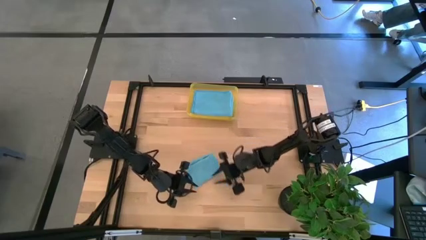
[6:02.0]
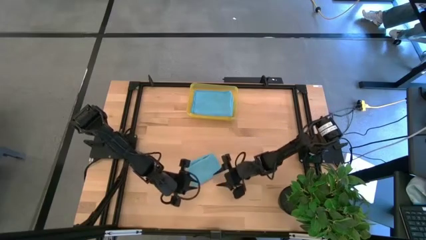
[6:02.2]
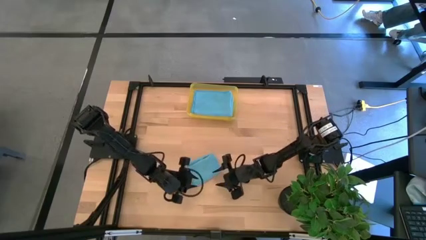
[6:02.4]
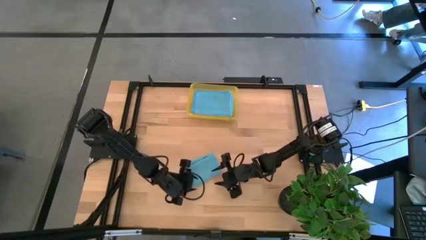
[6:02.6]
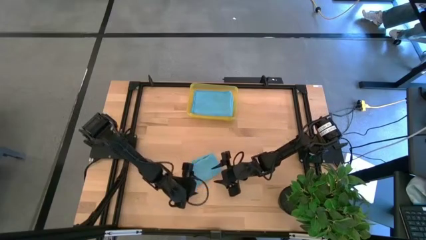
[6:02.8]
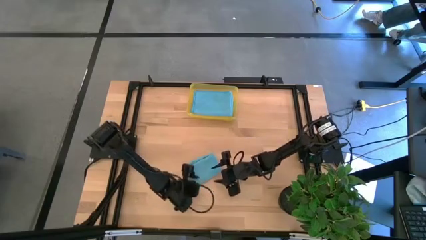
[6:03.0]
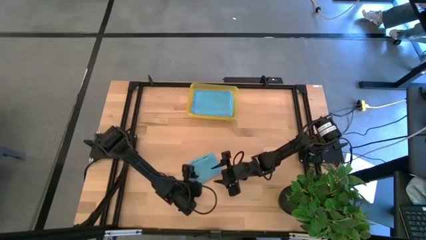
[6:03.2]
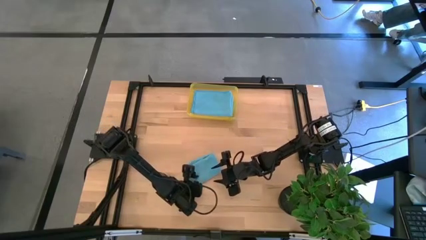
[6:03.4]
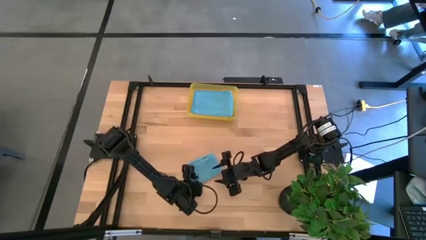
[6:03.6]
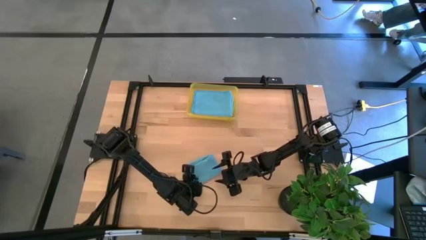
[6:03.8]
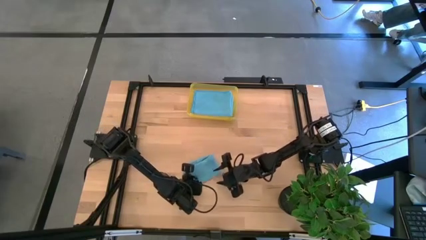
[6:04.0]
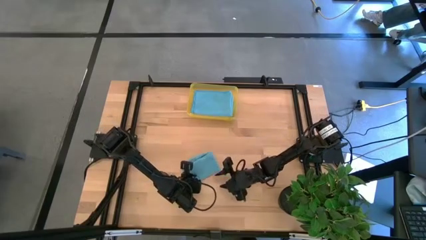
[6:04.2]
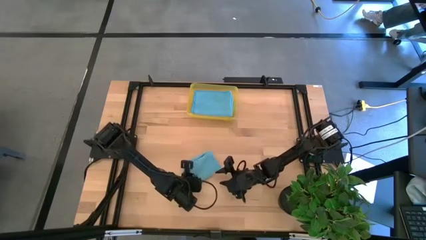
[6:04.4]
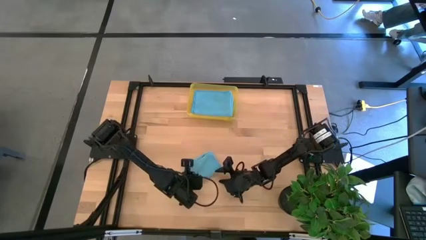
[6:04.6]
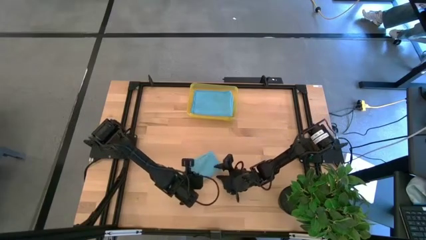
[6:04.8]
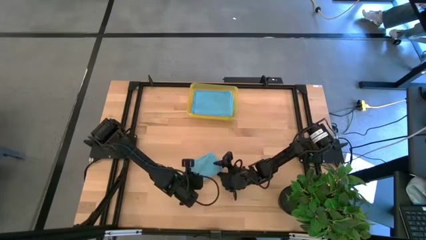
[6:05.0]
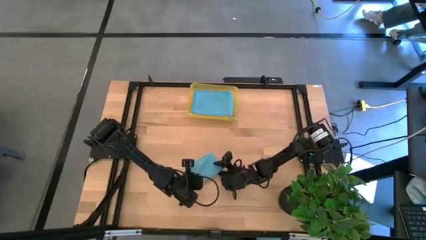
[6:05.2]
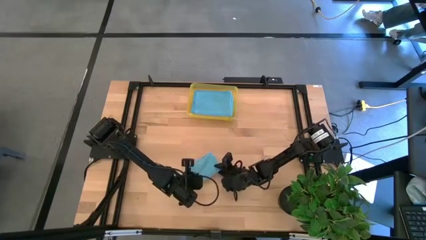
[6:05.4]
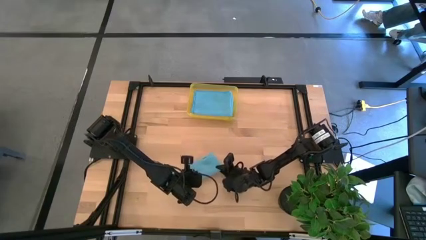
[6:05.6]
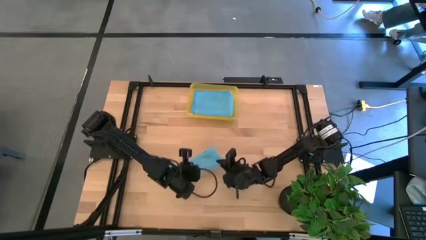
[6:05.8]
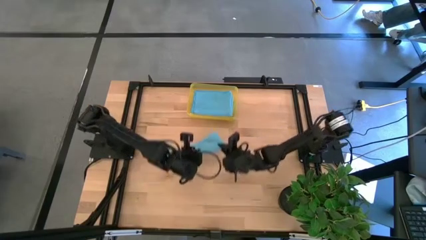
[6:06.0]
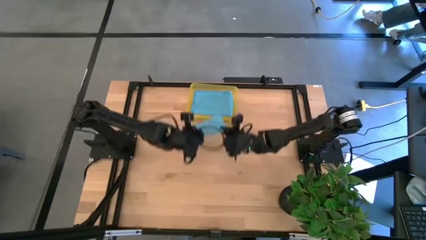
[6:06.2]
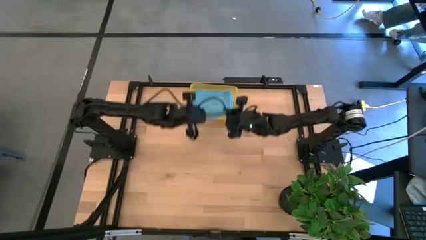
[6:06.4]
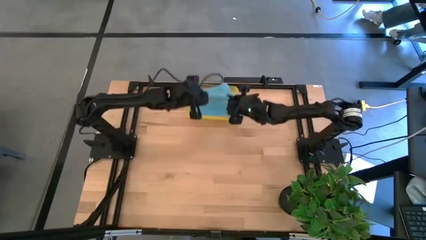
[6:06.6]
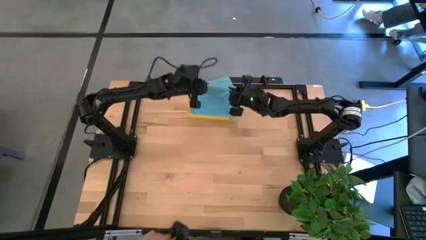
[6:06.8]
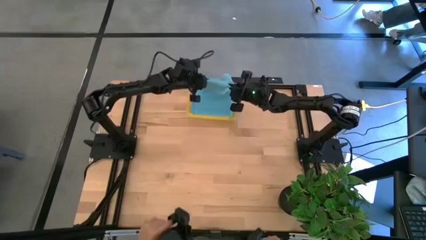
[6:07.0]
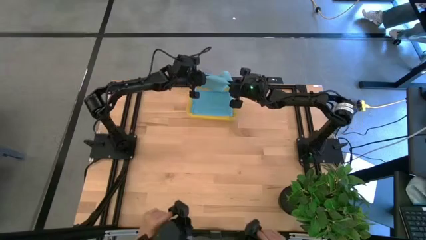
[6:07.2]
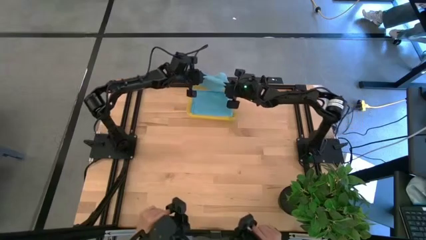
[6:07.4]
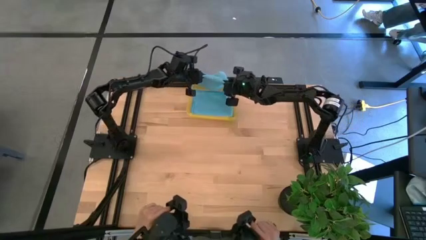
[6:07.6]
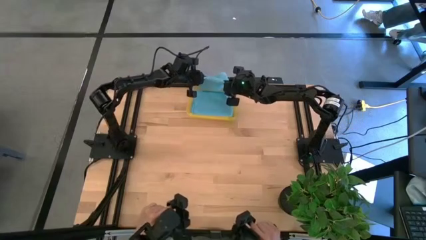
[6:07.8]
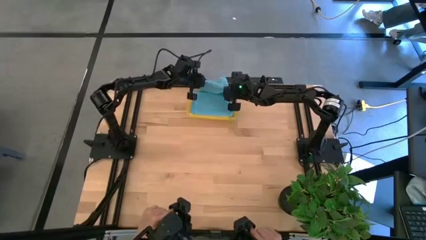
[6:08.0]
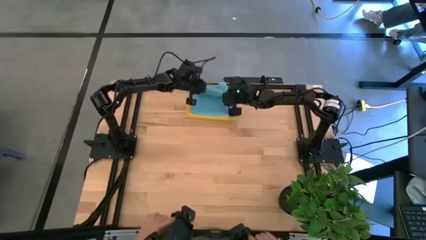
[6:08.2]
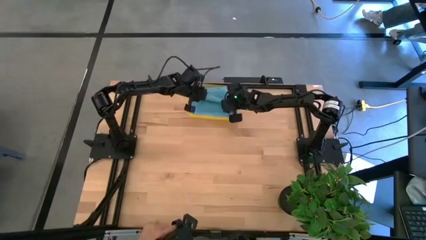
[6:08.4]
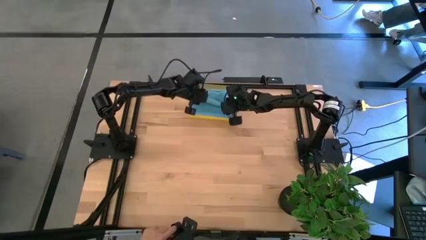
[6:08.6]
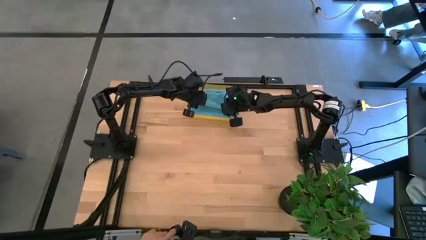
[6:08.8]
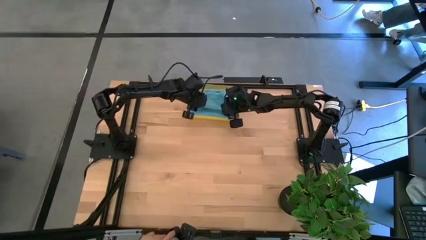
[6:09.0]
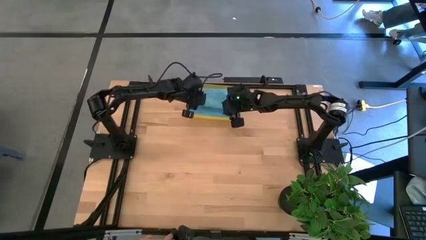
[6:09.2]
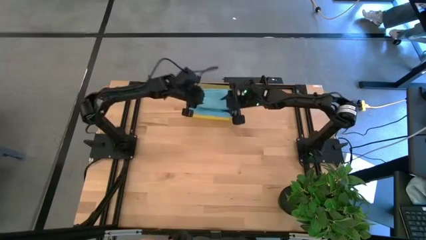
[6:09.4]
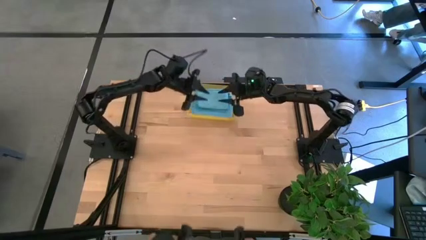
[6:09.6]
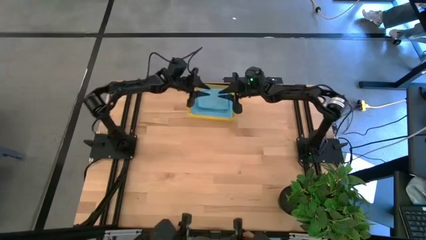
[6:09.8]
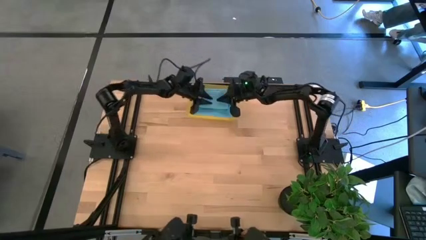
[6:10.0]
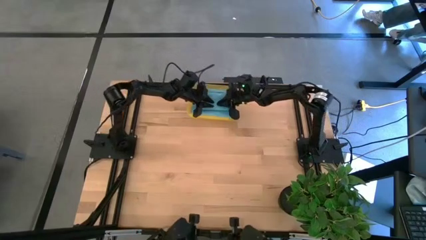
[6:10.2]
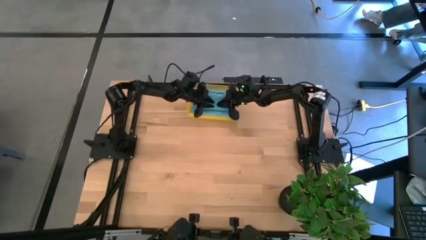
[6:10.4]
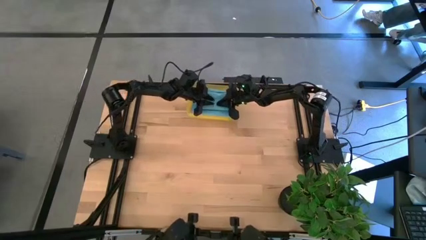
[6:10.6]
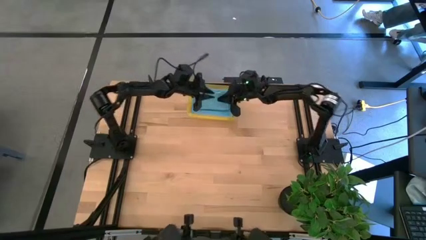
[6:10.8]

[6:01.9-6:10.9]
Task: Fold microfiber towels
Put the blue towel into the yellow bin

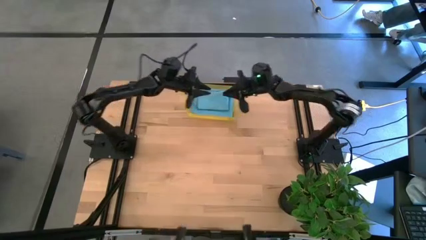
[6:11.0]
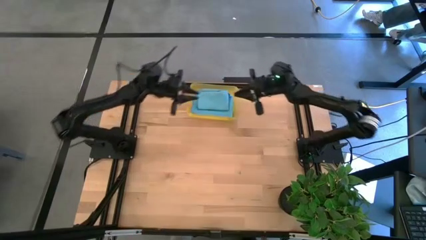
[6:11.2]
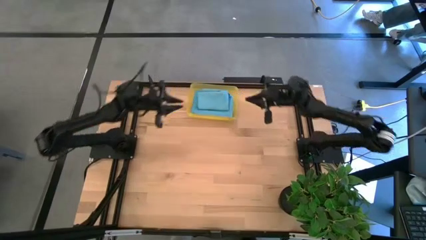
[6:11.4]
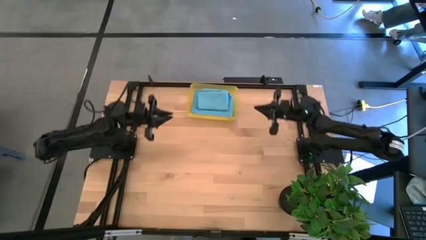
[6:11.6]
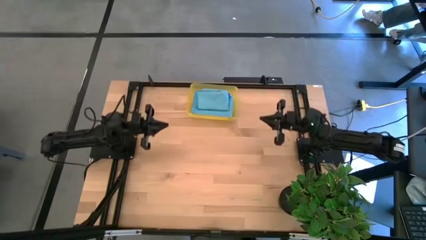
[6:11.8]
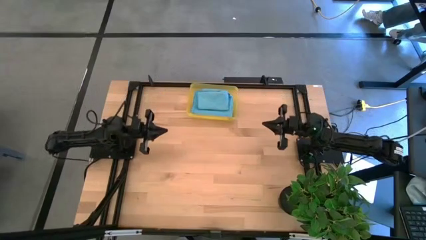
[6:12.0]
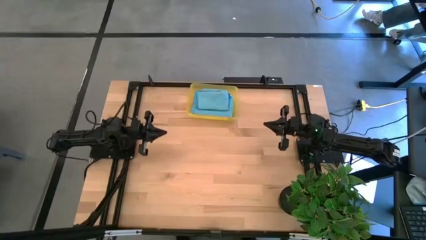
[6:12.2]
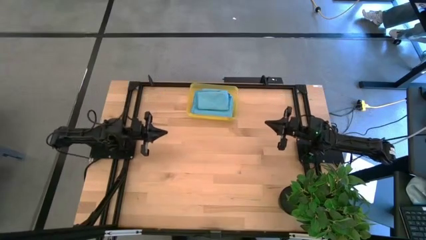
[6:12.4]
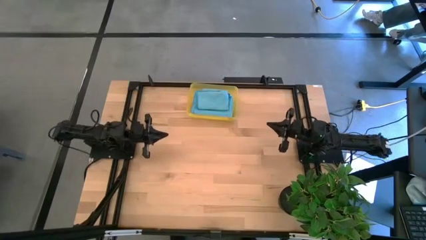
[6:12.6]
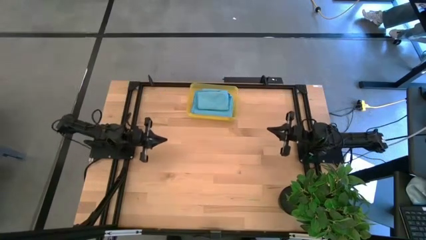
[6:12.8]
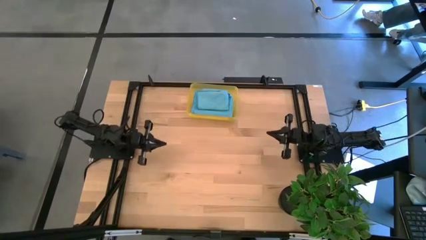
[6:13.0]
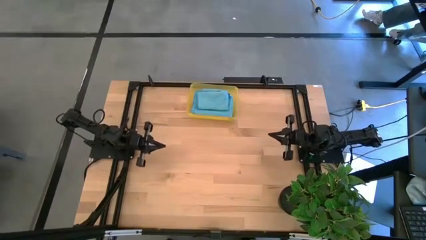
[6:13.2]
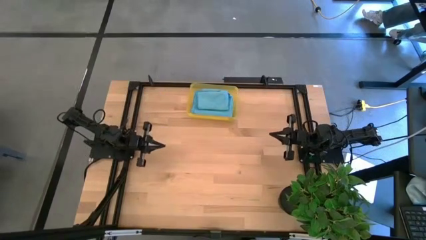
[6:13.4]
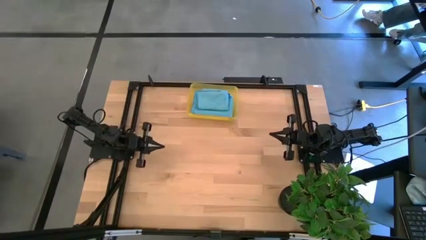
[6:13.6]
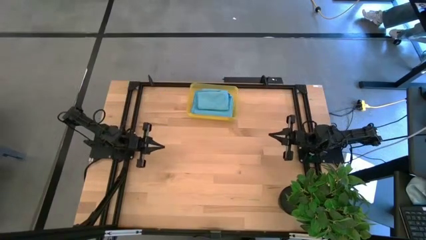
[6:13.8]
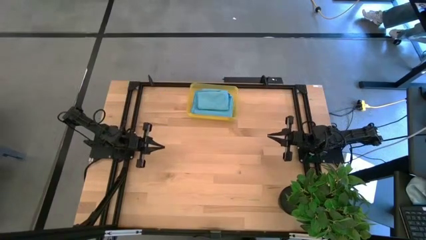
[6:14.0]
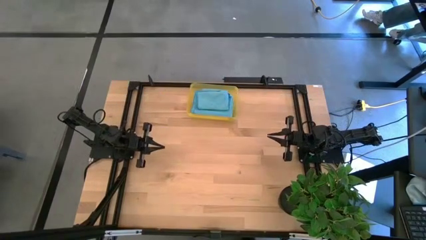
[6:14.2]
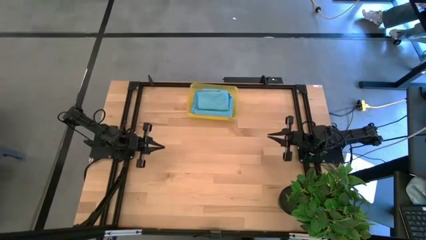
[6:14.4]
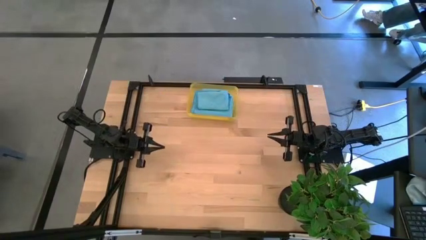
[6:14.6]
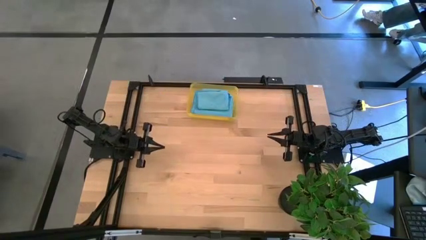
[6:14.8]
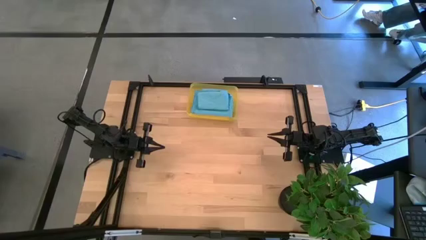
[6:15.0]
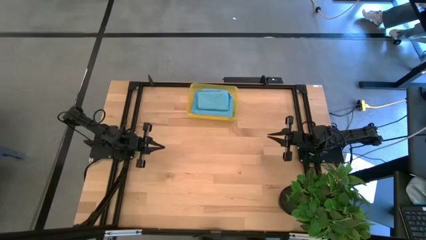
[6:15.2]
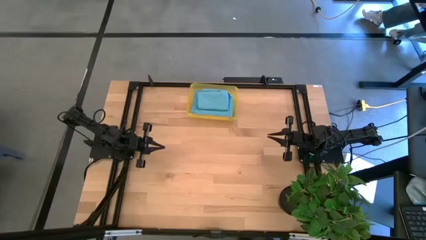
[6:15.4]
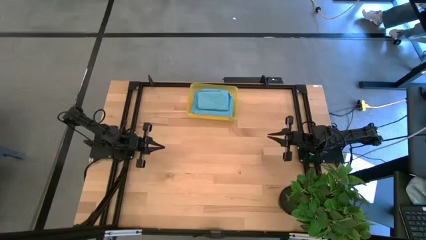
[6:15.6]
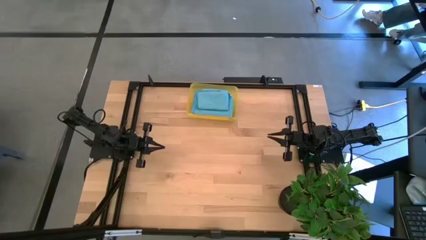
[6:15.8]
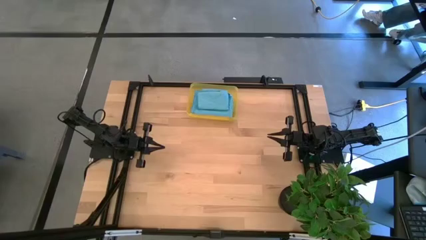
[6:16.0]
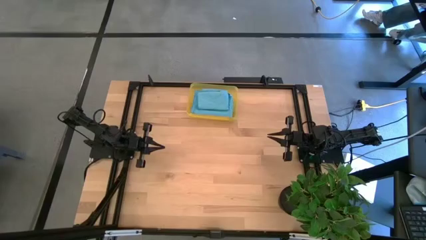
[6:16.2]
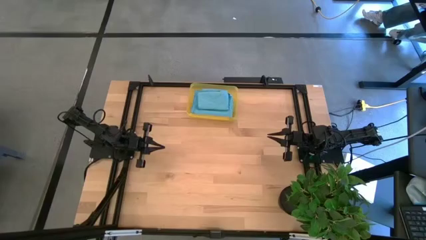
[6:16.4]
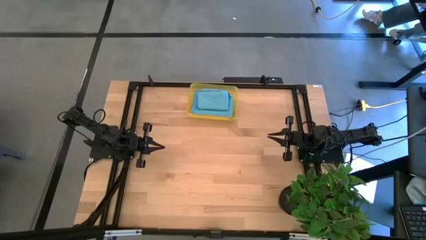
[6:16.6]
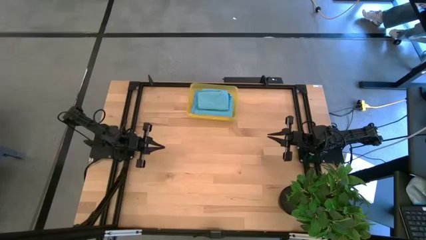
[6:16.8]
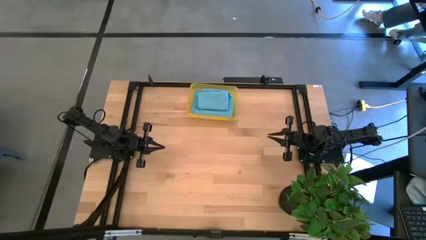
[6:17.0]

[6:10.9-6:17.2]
Return to Home Position
